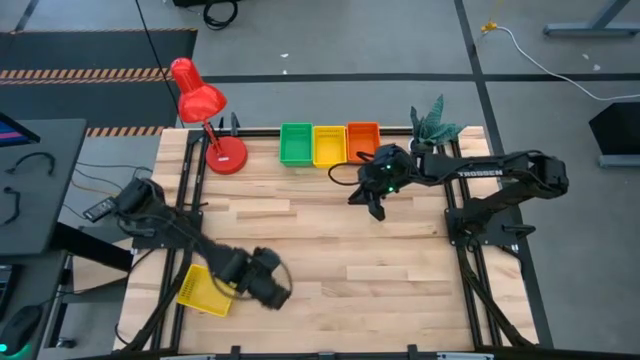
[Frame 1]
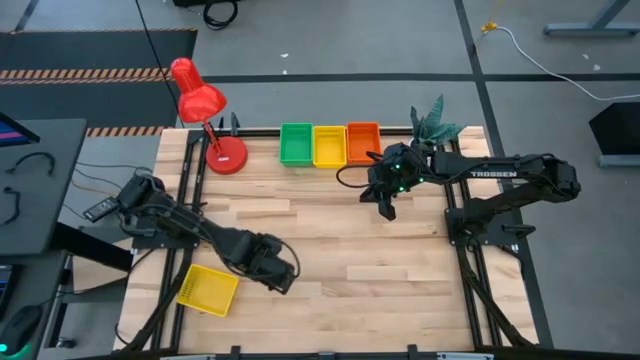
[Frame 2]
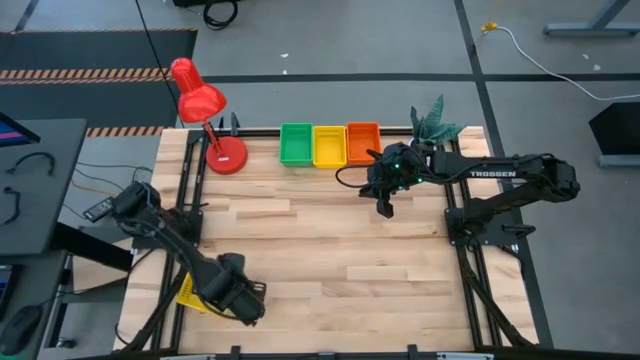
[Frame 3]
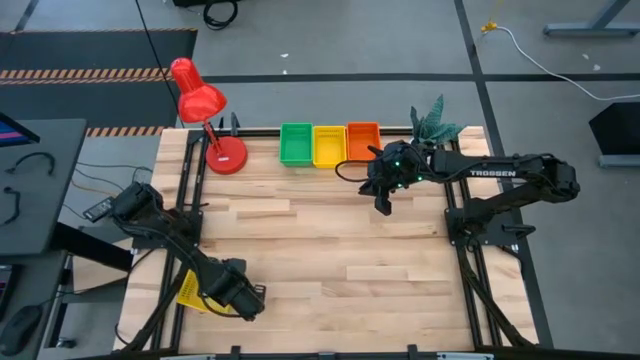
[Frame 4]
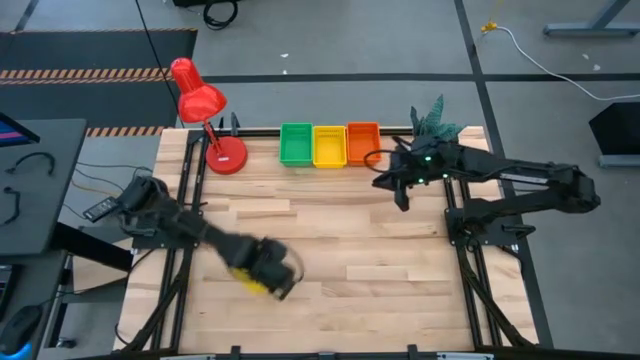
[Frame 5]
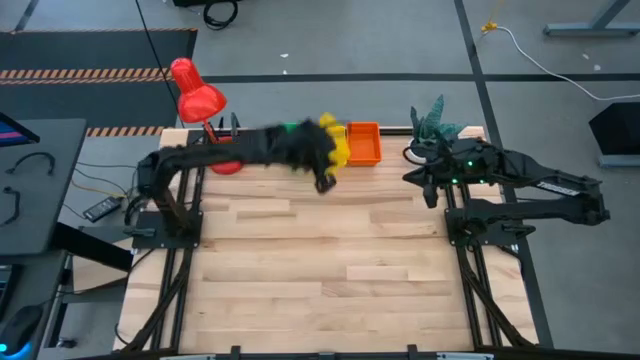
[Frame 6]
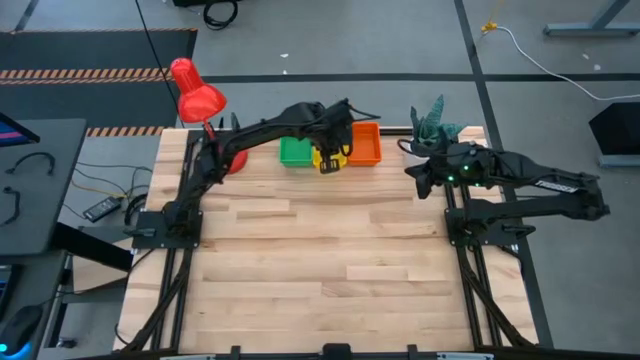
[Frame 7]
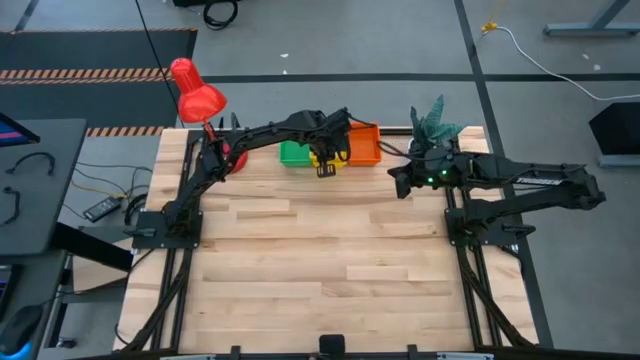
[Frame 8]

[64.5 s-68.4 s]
Stack the bottom yellow bin on top of the top yellow bin

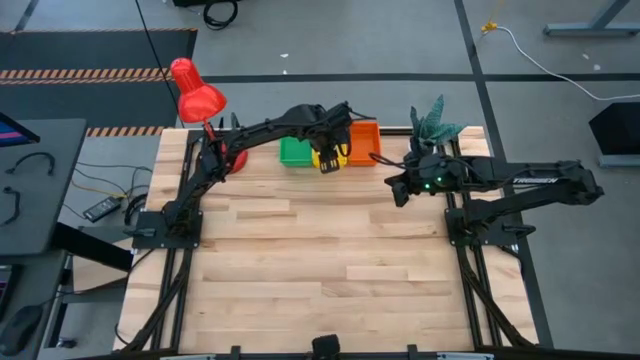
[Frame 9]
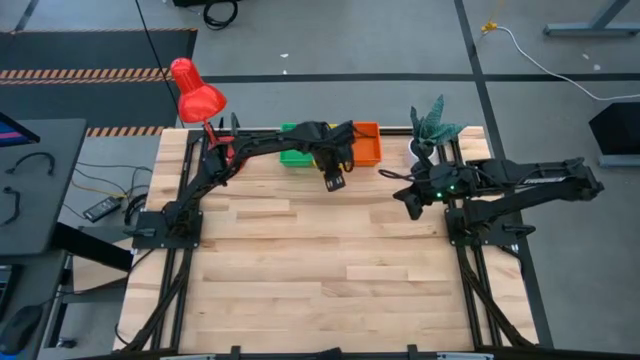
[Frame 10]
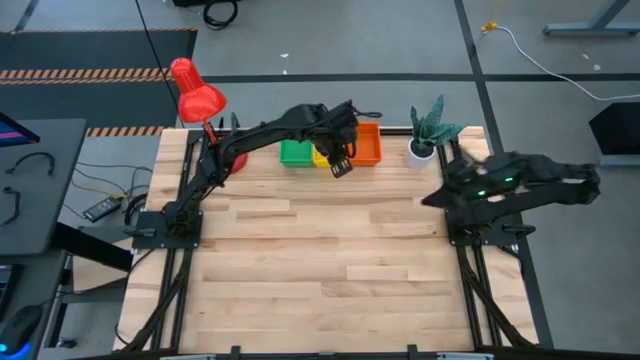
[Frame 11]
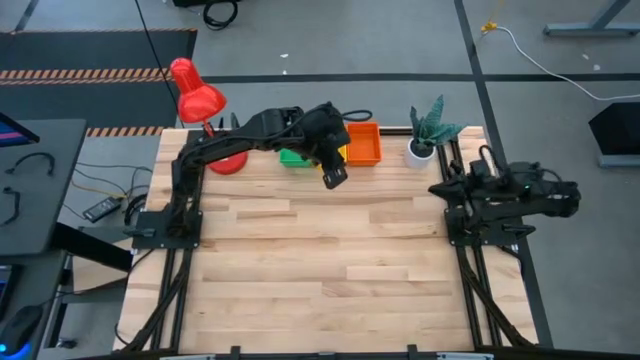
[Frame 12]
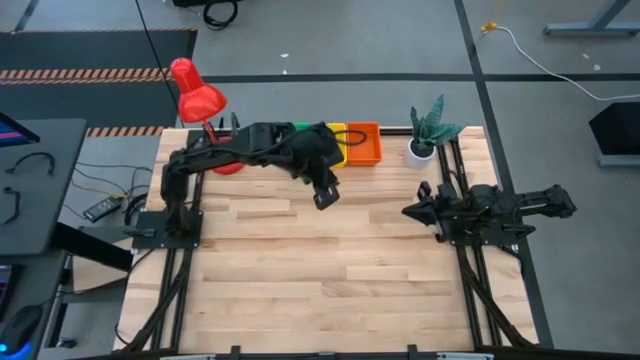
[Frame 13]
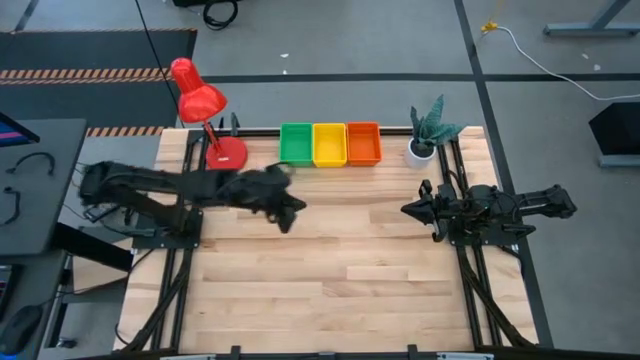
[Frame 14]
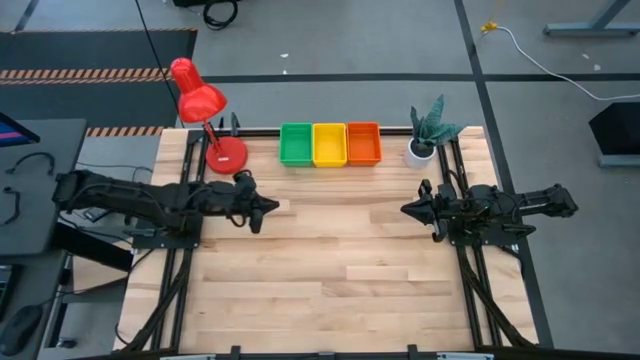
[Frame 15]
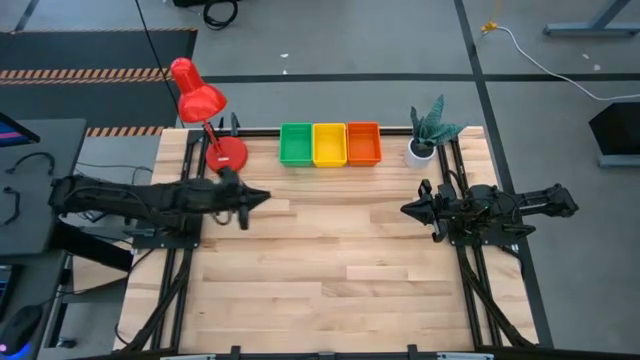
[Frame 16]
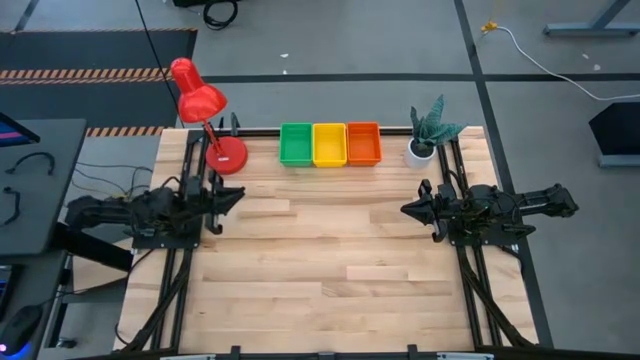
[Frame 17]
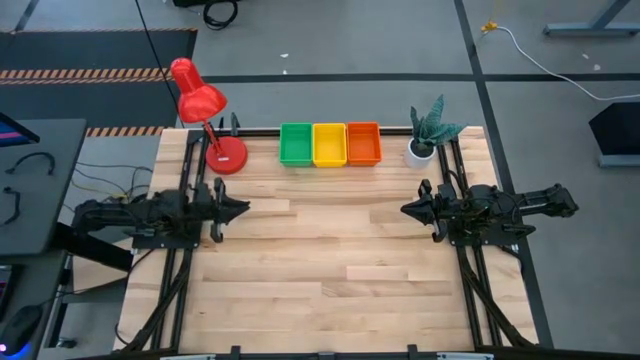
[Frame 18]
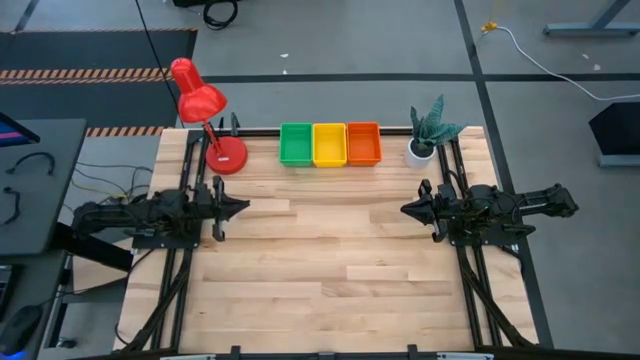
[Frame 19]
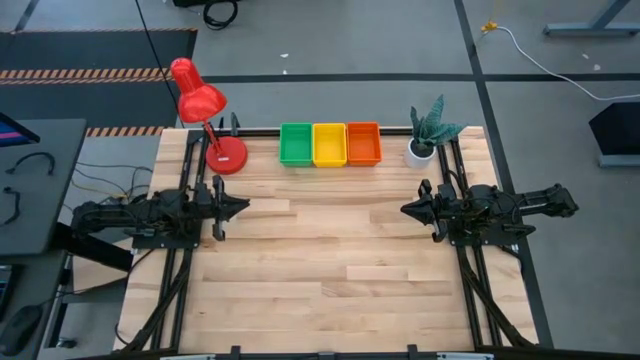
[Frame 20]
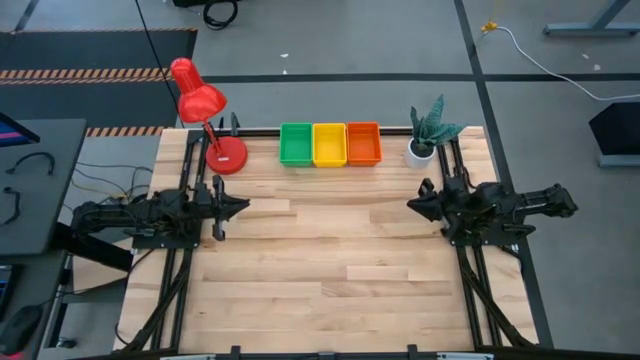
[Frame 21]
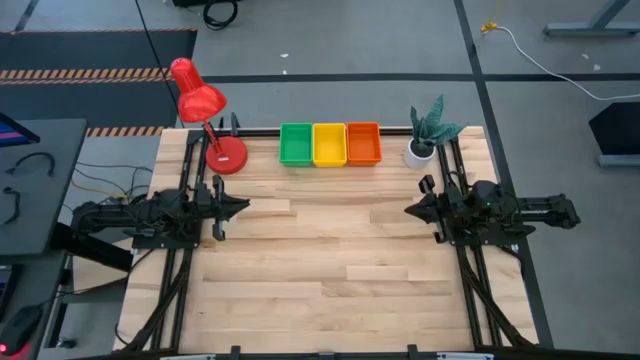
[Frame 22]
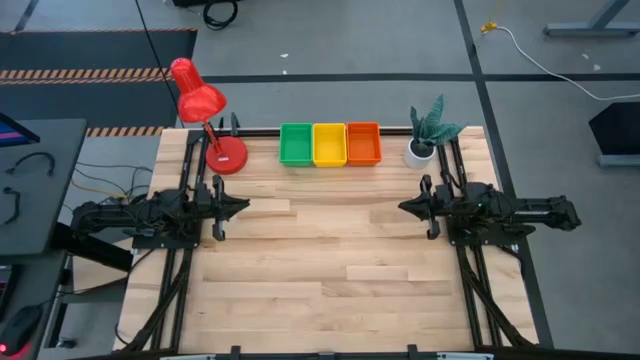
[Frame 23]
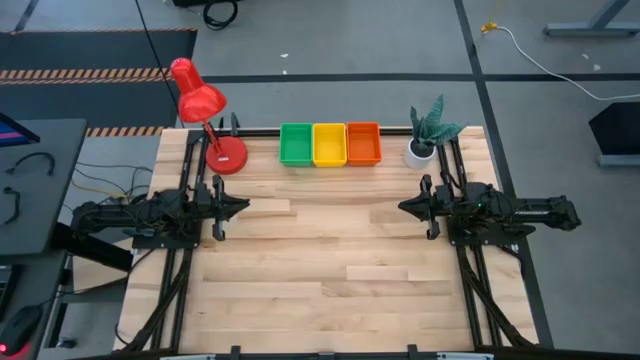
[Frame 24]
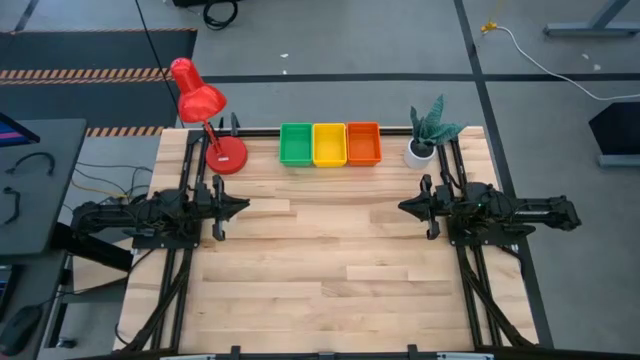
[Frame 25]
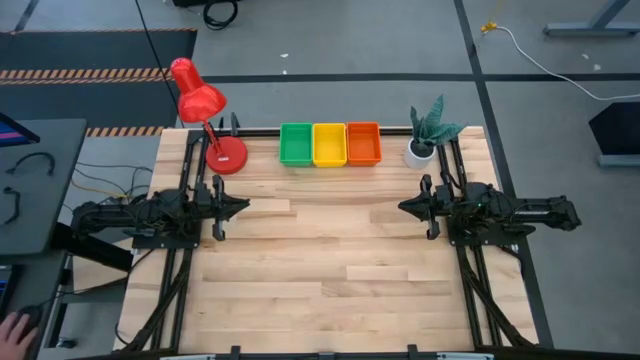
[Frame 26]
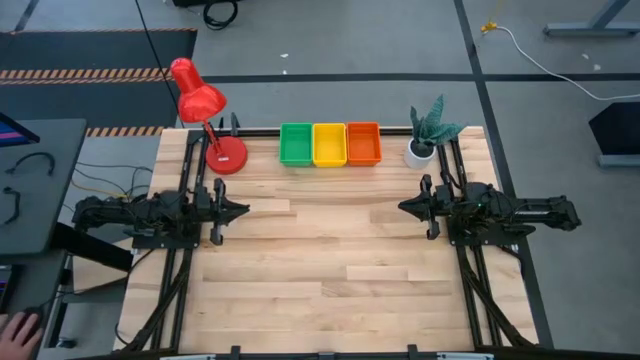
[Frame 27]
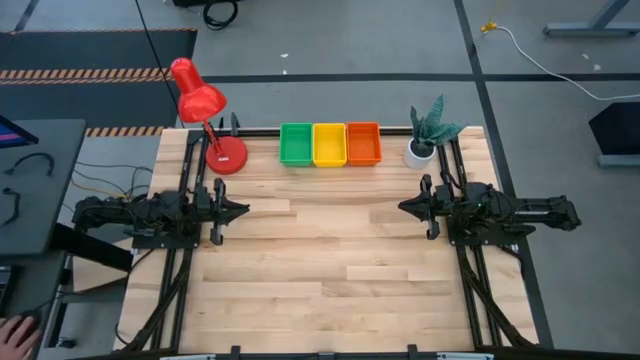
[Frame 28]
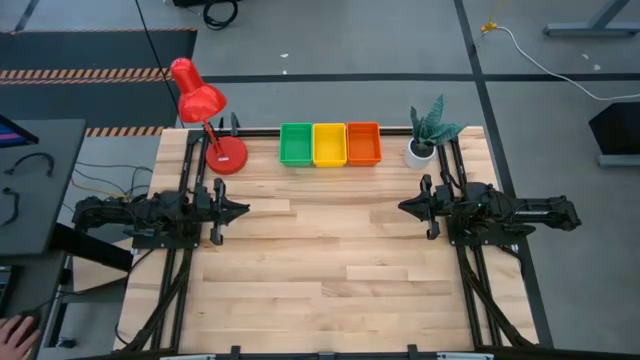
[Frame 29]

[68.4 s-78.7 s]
Return to Home Position

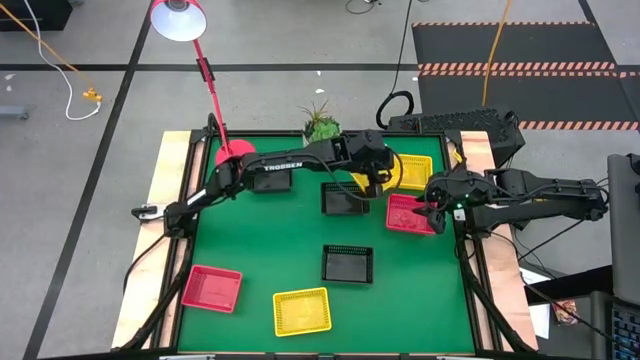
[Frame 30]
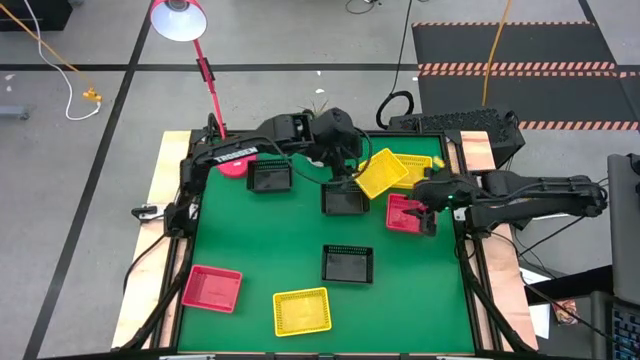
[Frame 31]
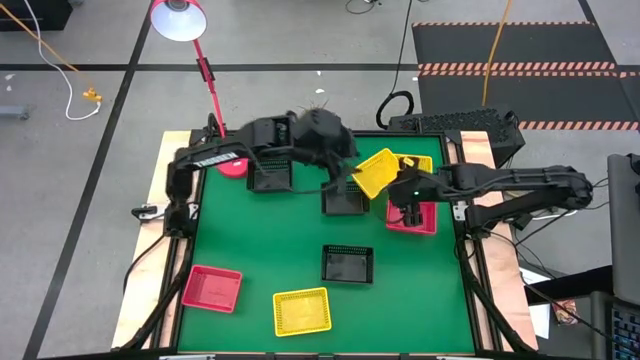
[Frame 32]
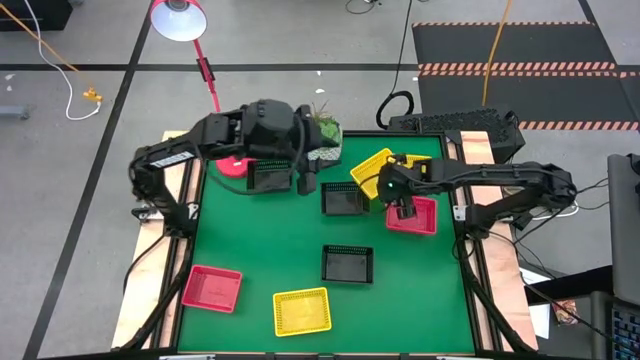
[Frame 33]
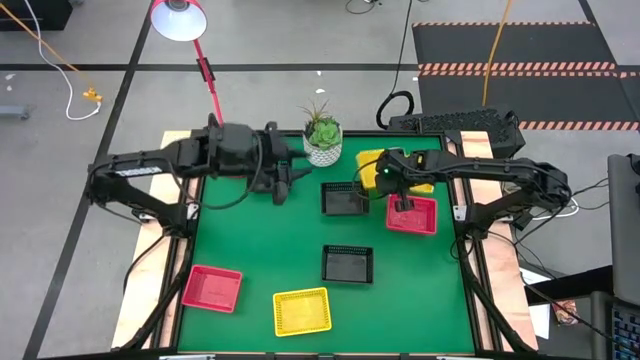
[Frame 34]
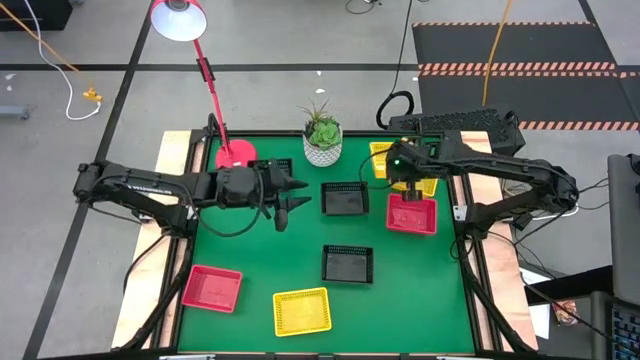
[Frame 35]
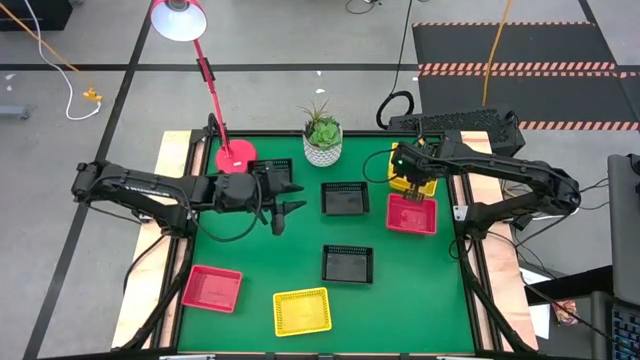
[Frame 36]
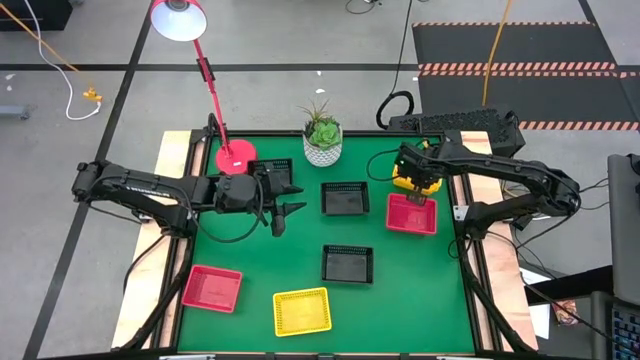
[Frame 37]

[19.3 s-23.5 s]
Stack the left yellow bin on top of the top yellow bin
